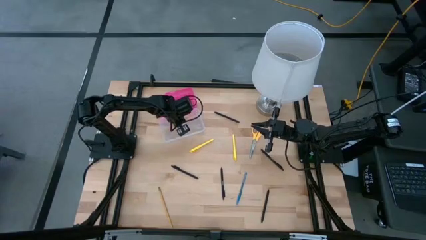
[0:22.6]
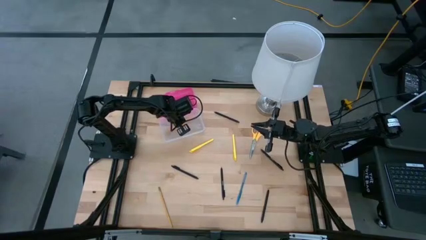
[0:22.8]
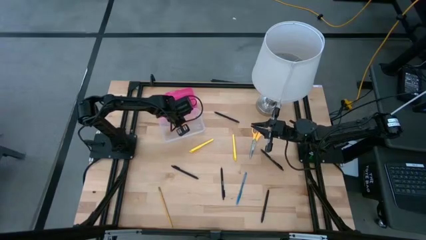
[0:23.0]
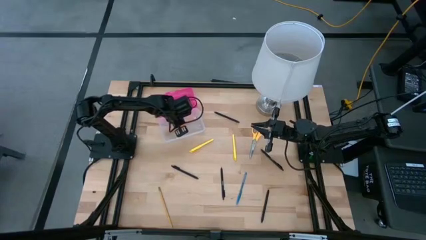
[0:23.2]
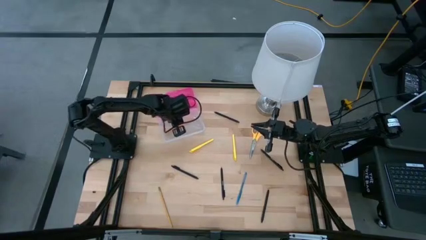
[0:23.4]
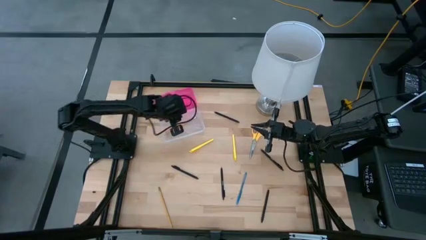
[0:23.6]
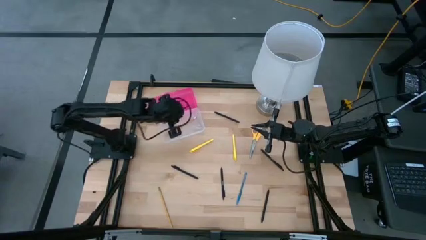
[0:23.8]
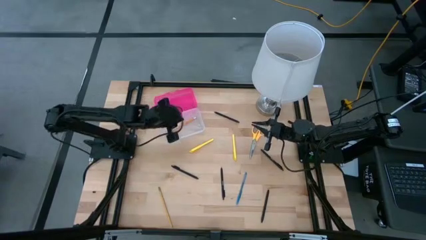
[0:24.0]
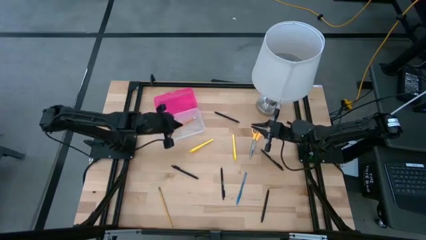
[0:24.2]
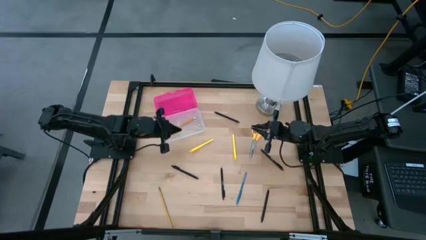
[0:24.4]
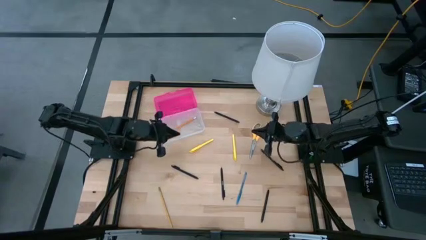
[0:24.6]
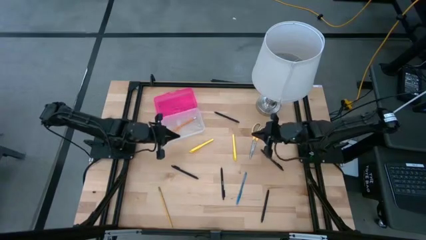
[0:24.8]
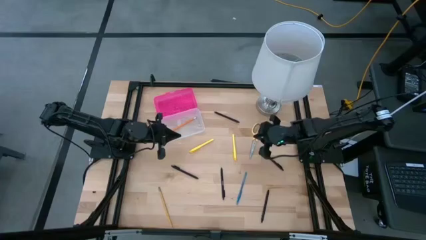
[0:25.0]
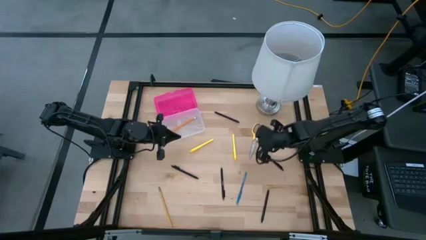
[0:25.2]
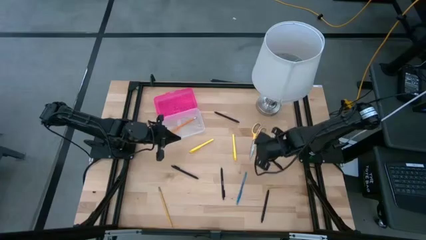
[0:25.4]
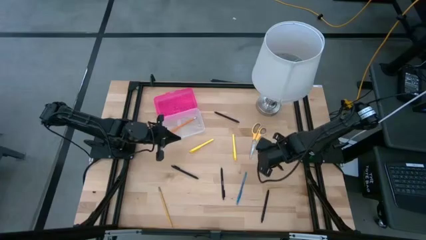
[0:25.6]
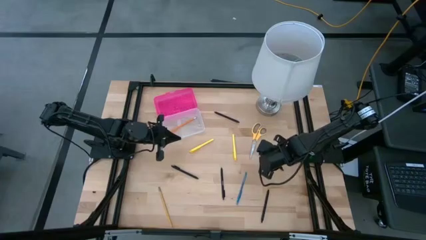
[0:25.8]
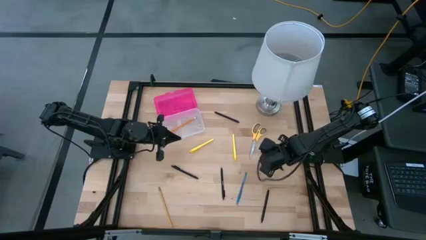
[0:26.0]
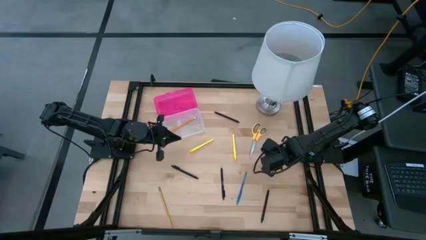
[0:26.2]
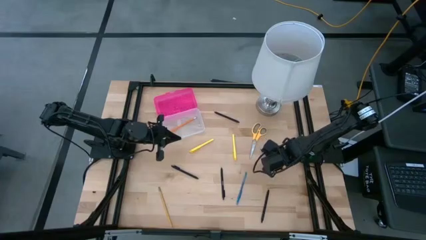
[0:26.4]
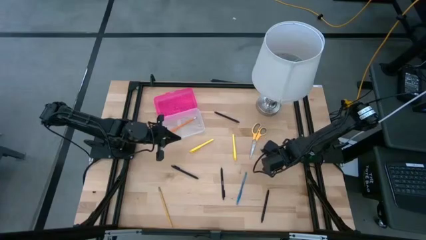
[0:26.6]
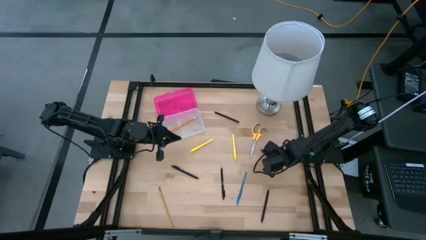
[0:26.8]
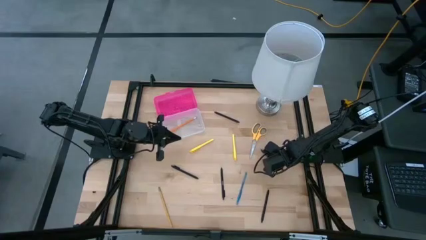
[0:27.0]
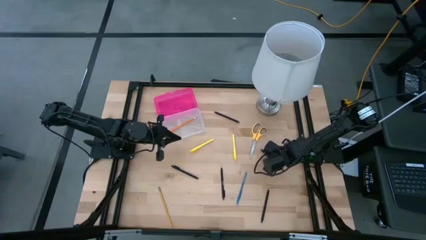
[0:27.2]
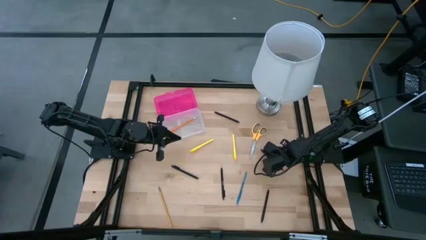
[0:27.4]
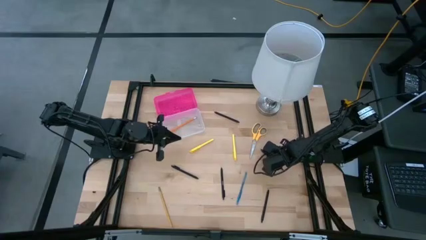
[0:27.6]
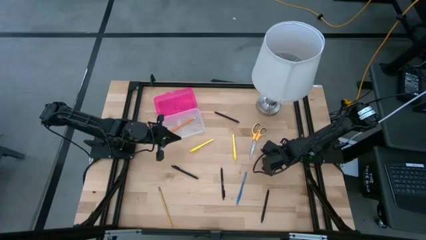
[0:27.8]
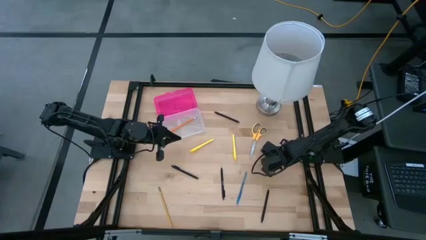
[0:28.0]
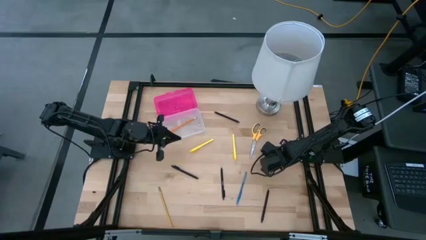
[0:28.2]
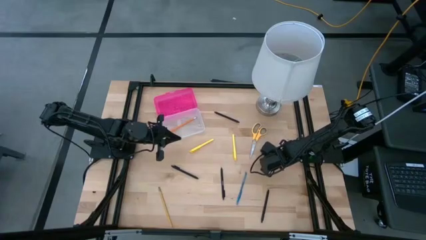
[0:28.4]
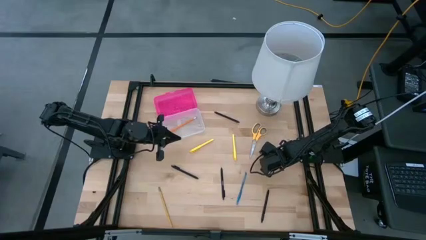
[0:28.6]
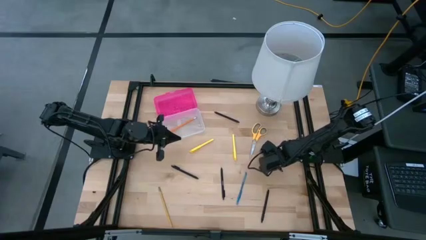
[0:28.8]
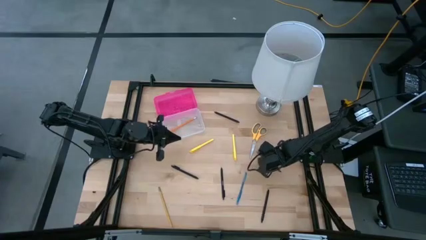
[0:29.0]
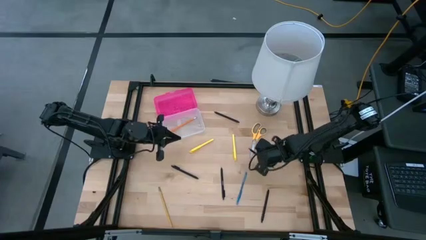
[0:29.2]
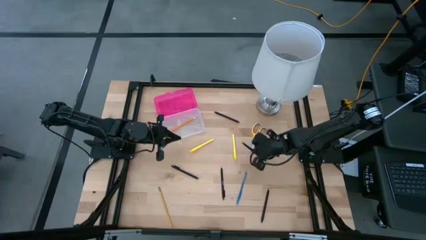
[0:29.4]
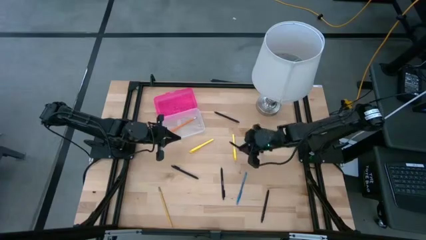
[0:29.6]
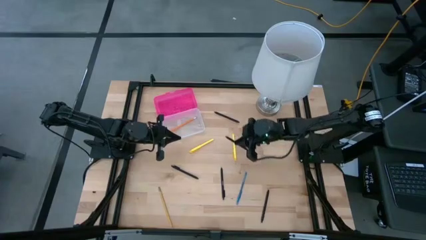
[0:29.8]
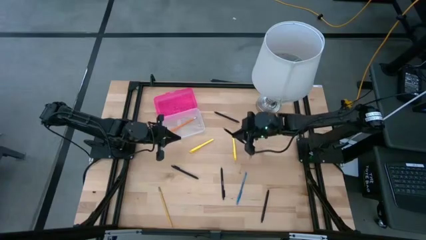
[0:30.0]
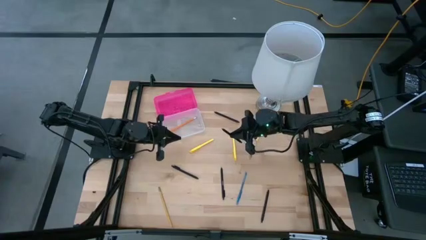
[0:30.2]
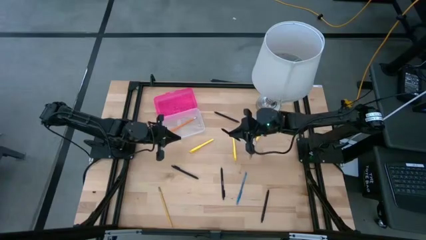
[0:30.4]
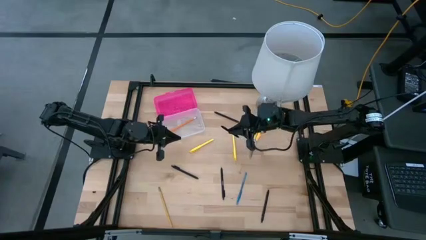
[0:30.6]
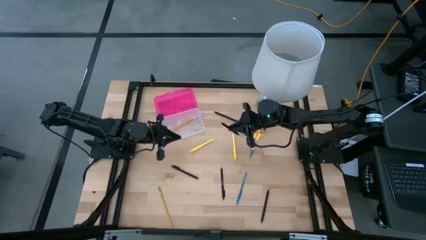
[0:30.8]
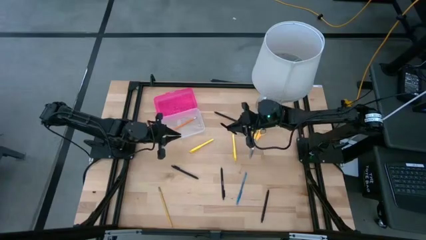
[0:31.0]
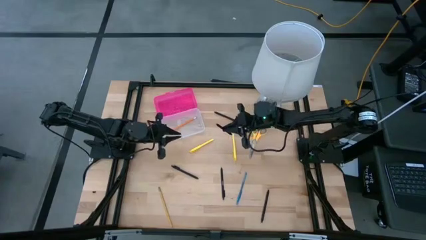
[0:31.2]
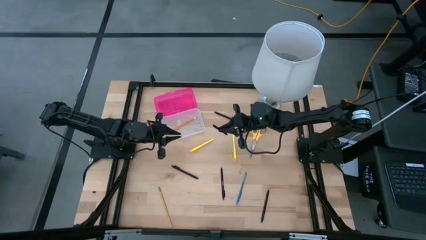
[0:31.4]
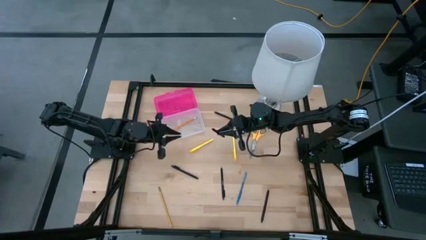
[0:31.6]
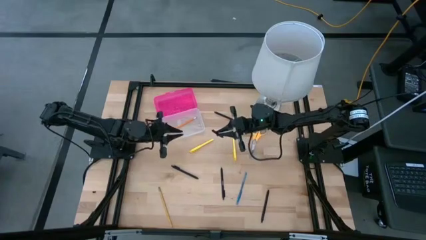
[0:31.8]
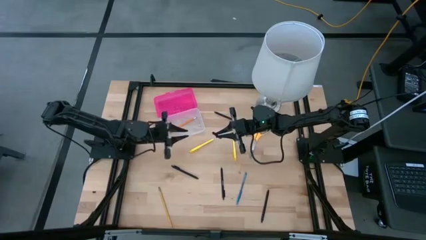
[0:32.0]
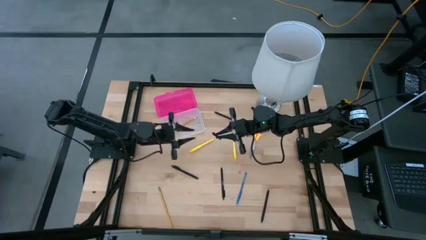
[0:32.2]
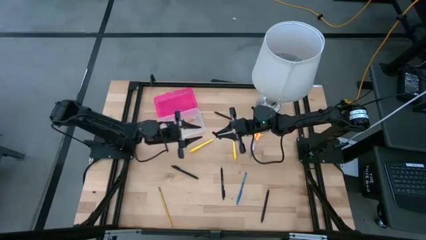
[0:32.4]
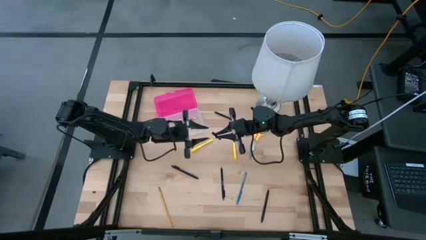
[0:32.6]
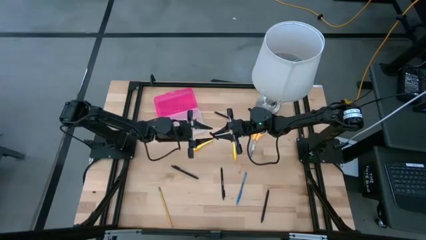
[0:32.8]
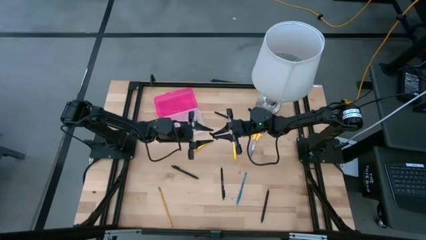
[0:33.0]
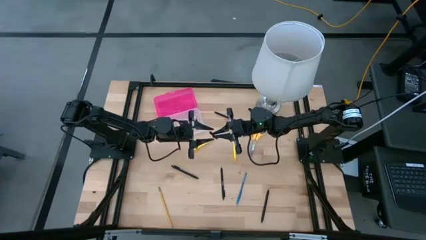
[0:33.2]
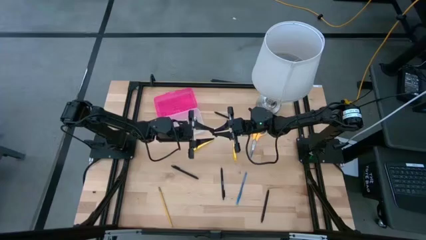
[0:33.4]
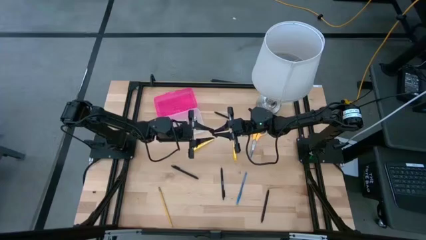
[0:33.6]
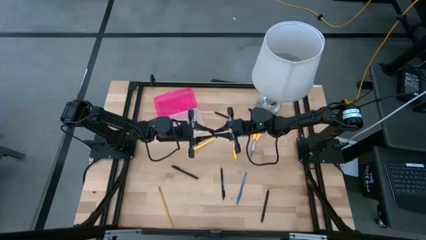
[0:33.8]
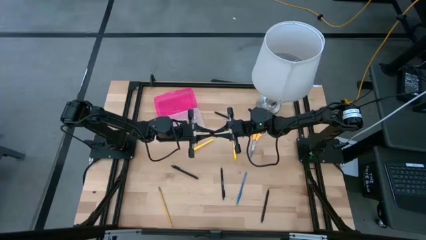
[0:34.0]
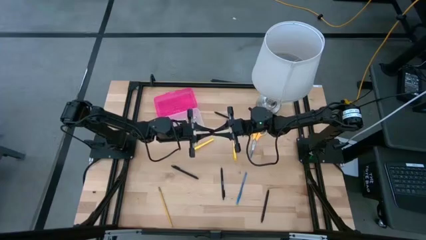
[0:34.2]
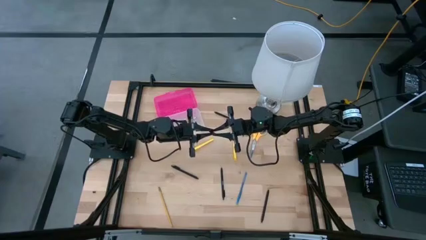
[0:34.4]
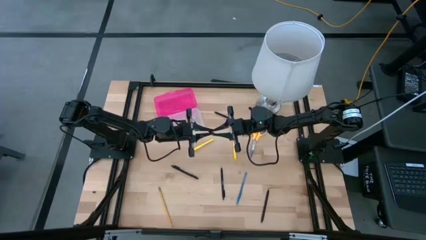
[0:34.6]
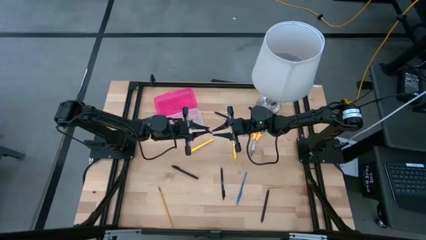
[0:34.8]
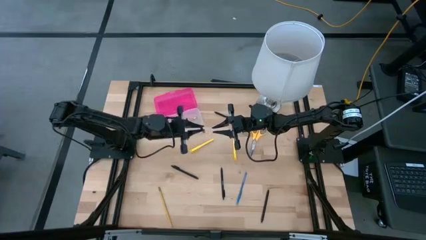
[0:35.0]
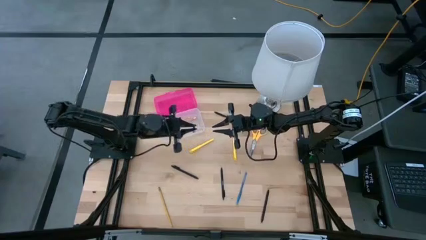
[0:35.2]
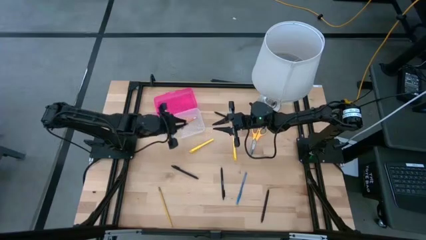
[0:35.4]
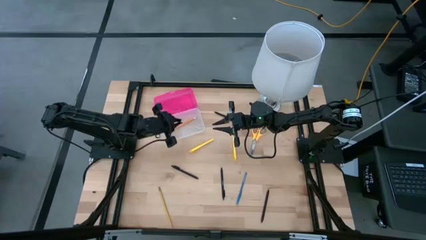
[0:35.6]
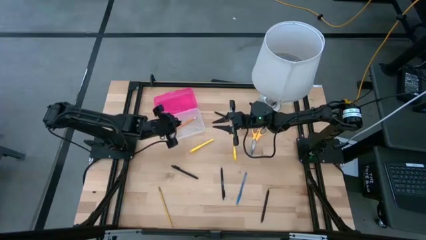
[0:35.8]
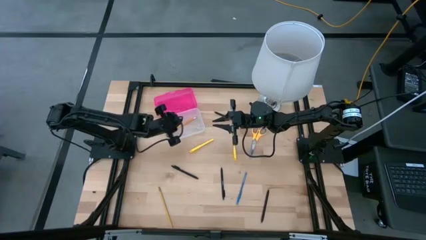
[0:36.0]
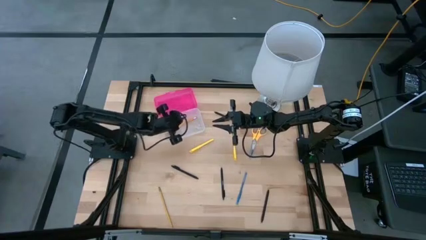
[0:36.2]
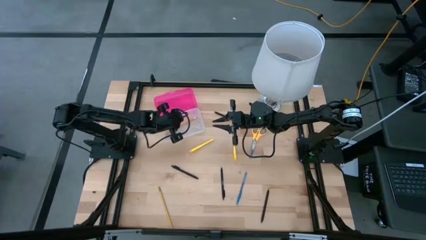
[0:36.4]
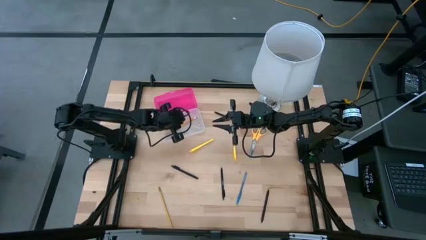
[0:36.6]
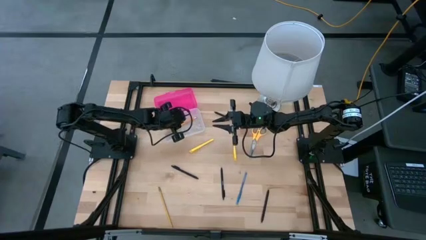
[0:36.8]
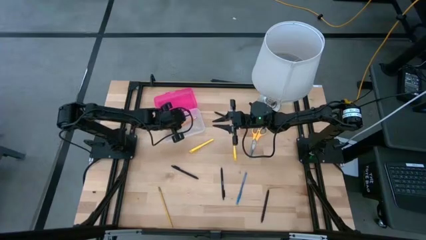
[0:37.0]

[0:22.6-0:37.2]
Task: Pick & place school supplies into a supply box
Put the black pen into the pink supply box

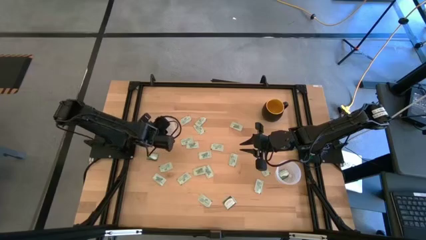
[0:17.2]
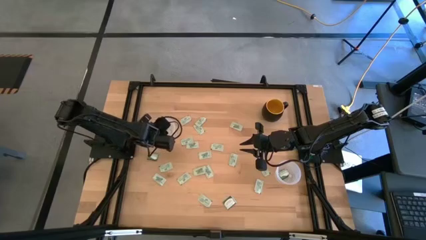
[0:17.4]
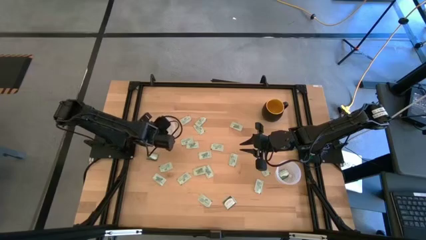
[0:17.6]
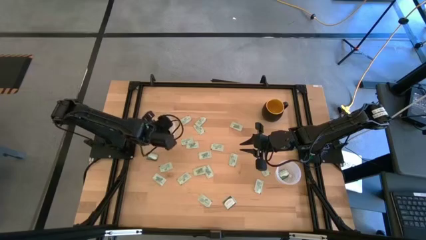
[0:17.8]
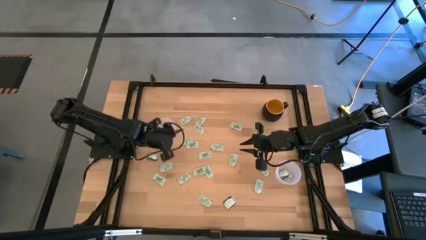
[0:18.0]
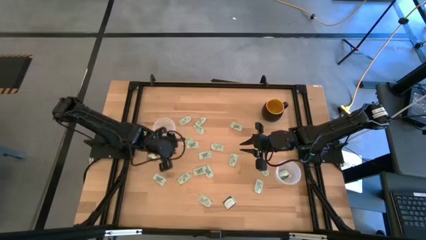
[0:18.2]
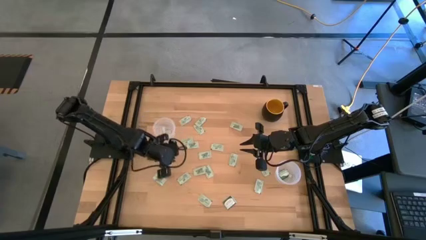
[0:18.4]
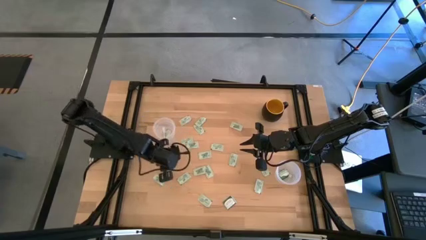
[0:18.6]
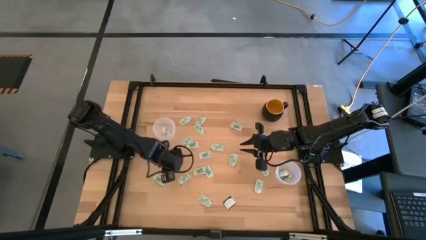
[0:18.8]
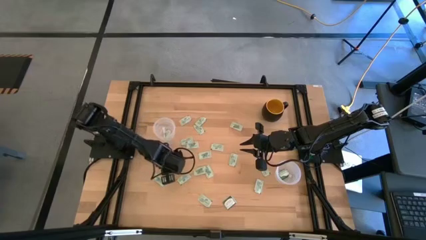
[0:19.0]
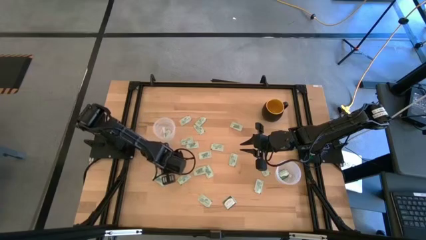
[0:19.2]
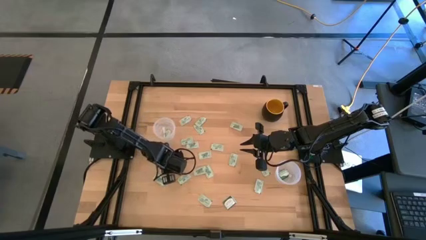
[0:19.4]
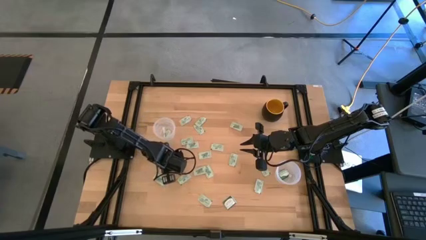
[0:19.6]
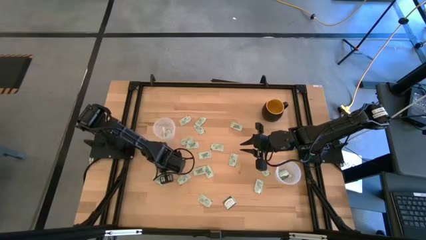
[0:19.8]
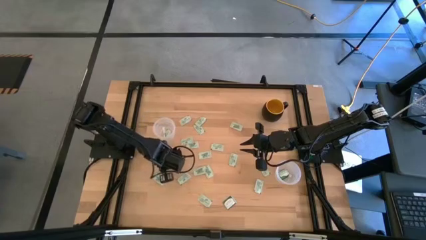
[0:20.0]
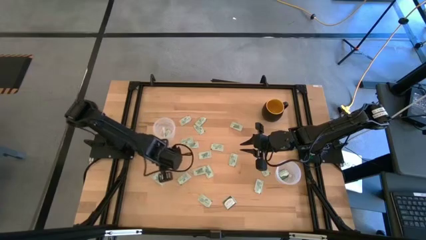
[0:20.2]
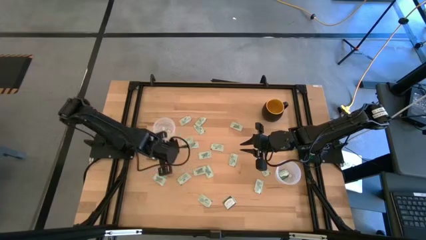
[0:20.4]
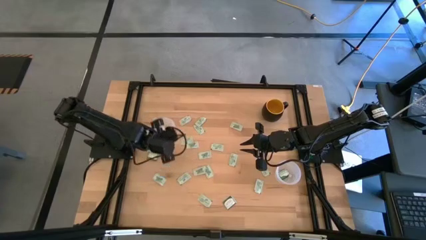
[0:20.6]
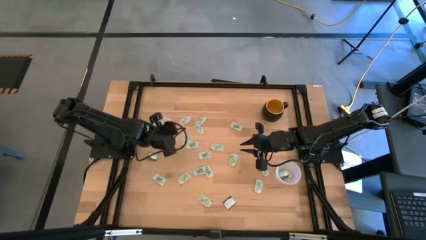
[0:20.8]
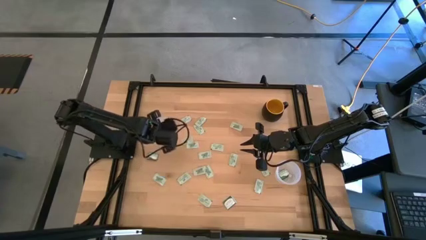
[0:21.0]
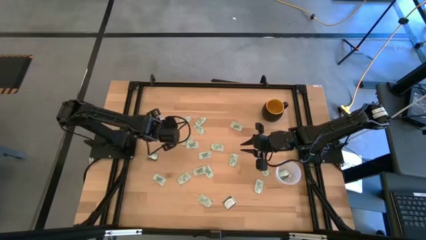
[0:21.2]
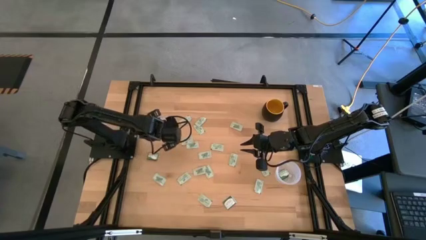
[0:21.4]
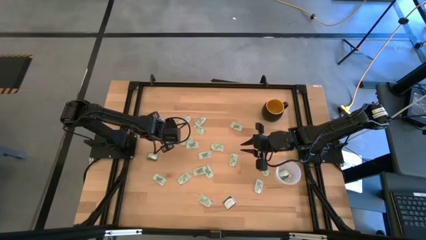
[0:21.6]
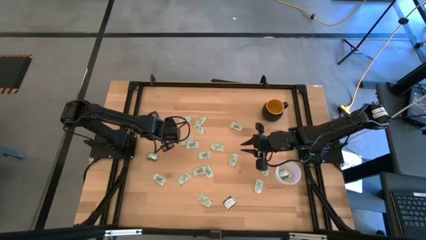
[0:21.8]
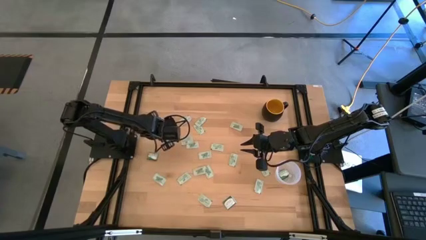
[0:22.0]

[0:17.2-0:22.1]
Task: Pick and place Stevia / Truvia into bins
Put the white stevia packet into the left transparent container
